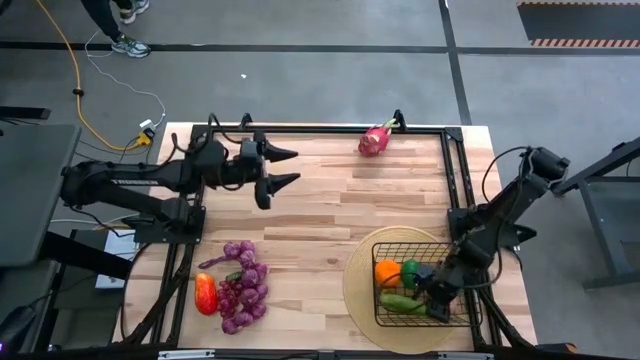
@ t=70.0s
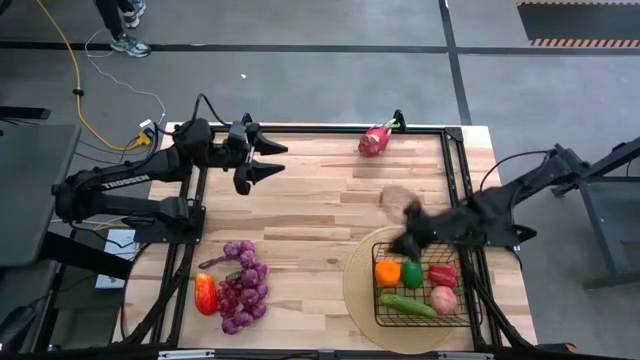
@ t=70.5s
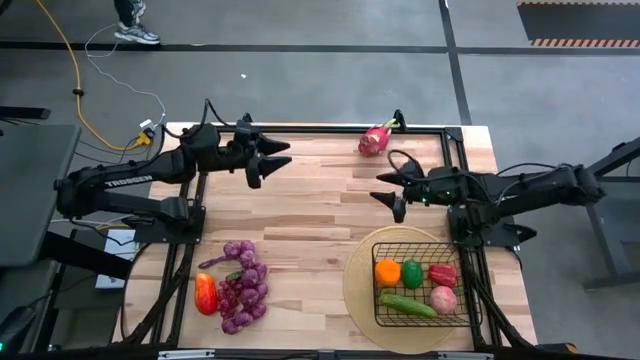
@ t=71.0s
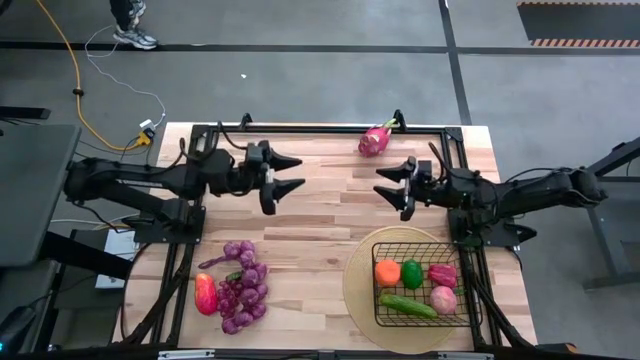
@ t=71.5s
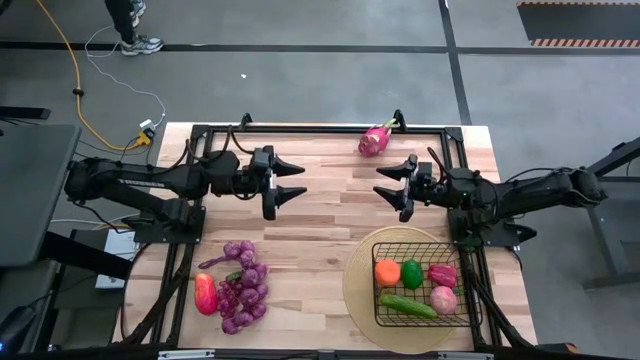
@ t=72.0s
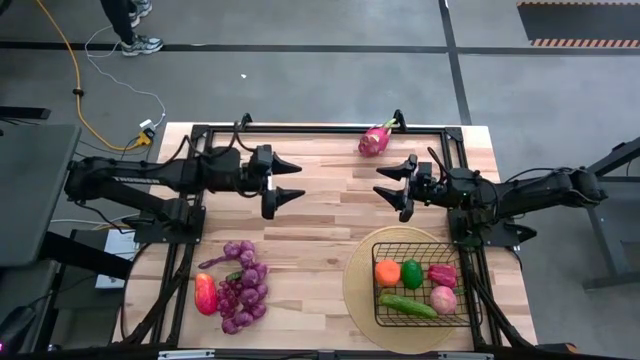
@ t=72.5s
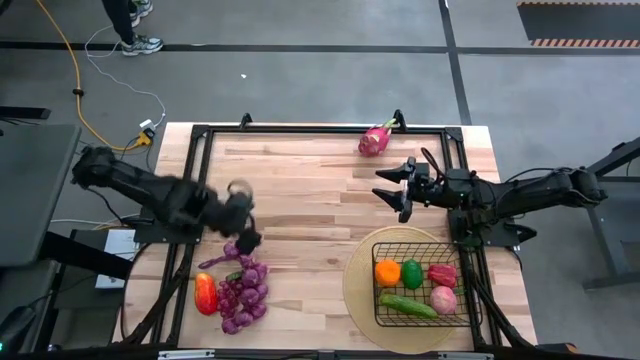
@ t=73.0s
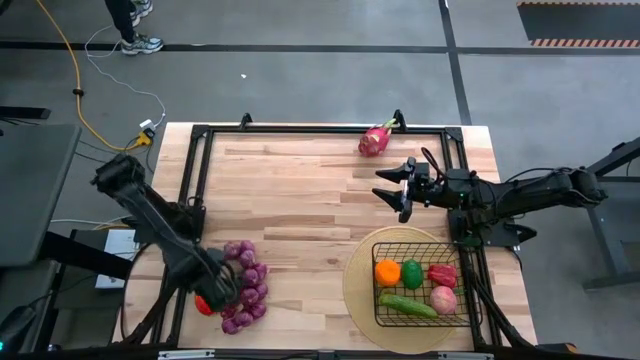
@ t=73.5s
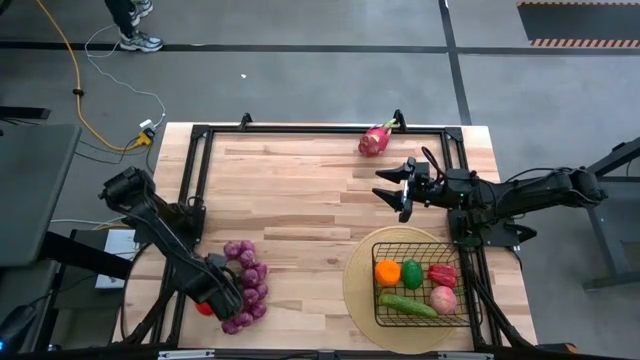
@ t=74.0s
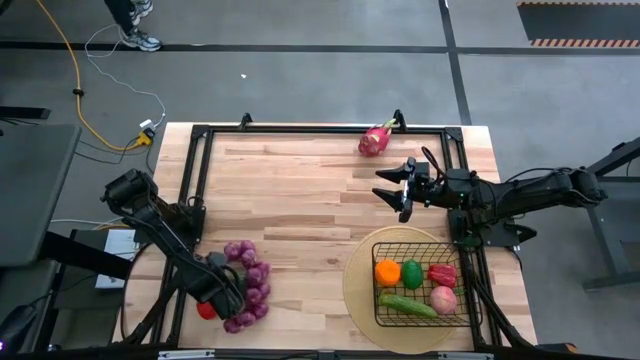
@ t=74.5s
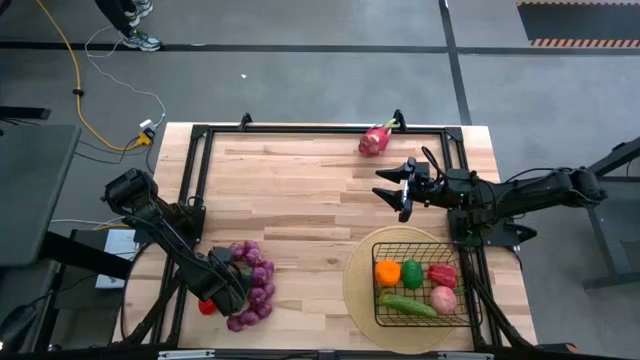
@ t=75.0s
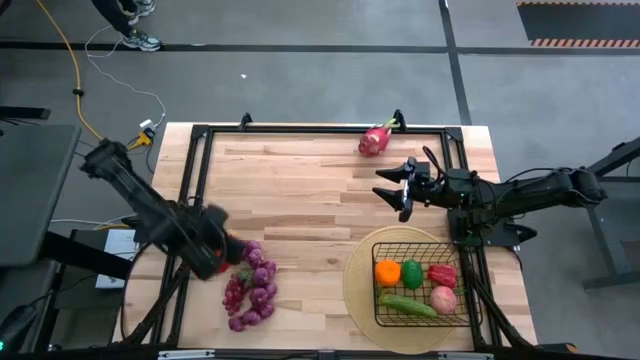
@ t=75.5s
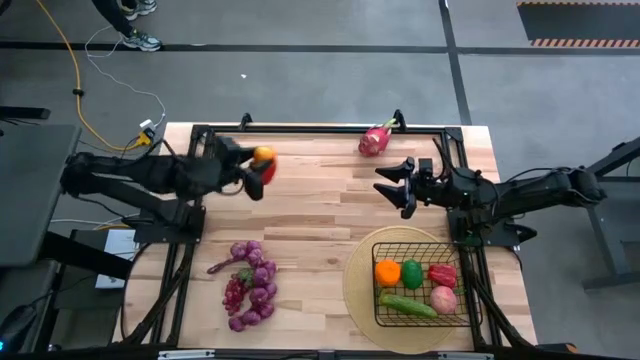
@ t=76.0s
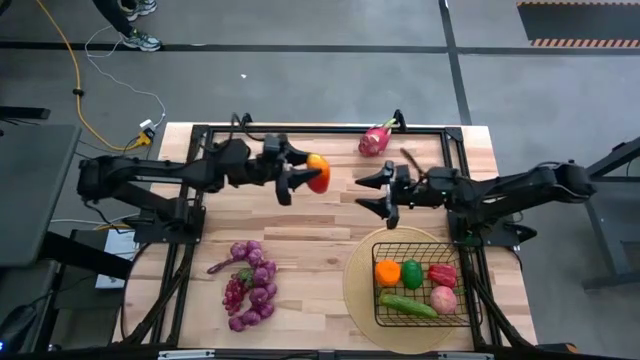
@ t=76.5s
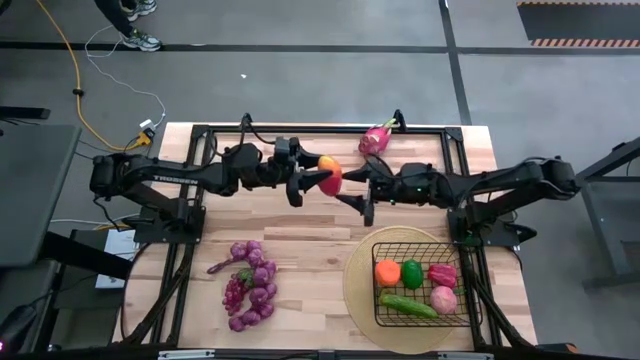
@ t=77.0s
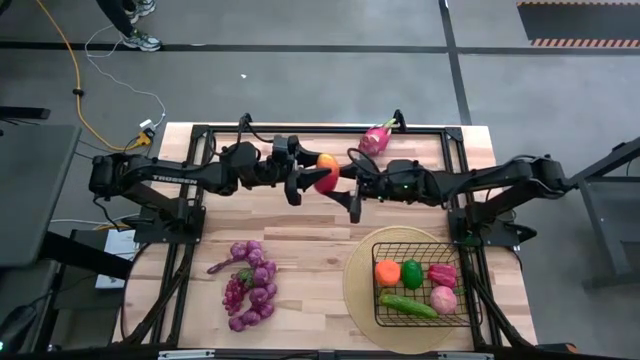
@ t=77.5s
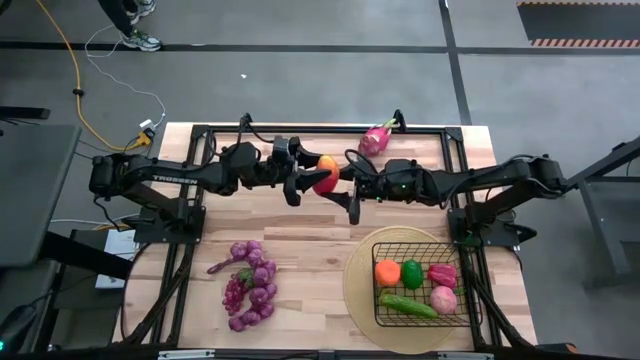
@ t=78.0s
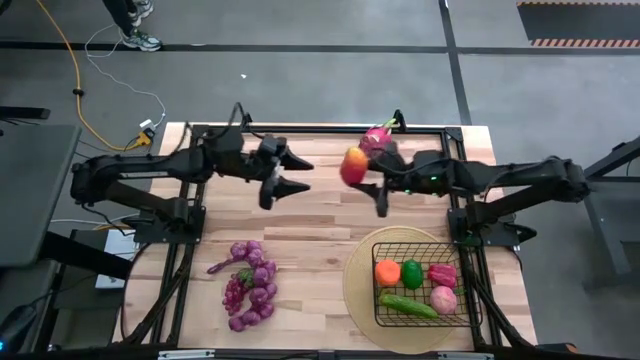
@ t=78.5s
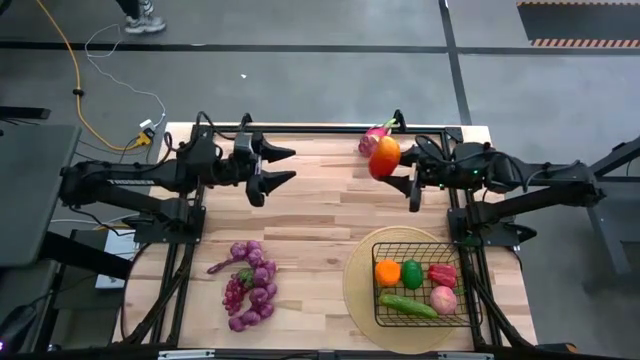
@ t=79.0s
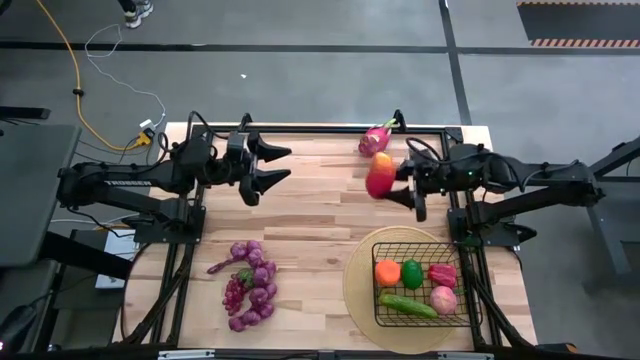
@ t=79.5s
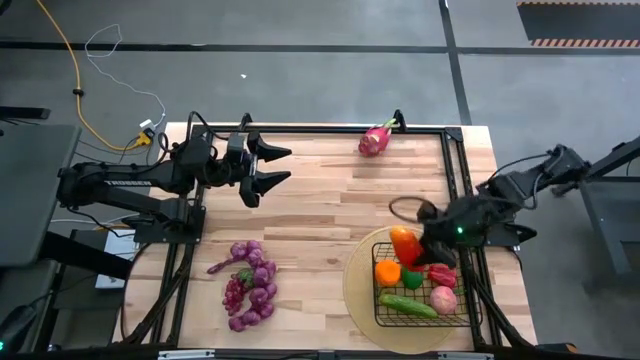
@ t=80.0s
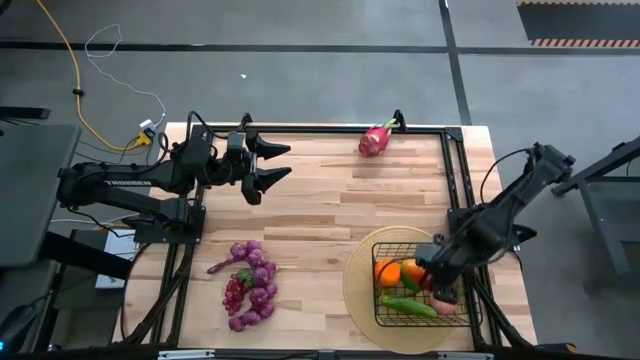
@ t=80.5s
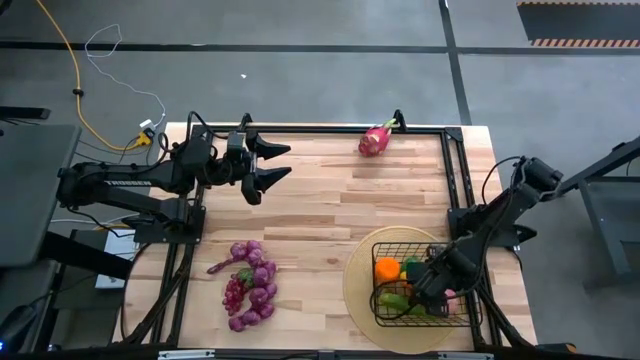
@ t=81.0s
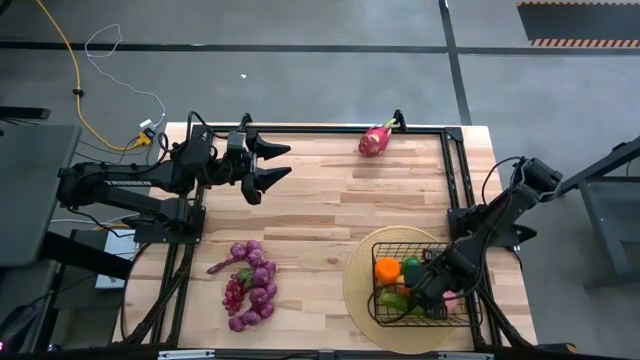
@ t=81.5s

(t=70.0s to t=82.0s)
Task: Build produce basket
Put the mango into the wire basket

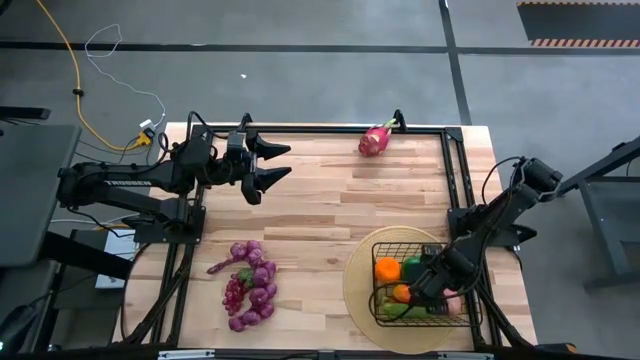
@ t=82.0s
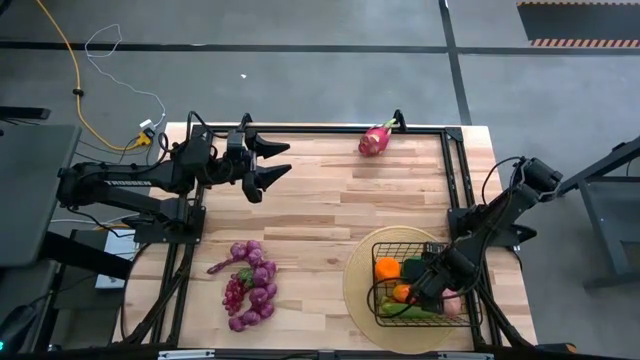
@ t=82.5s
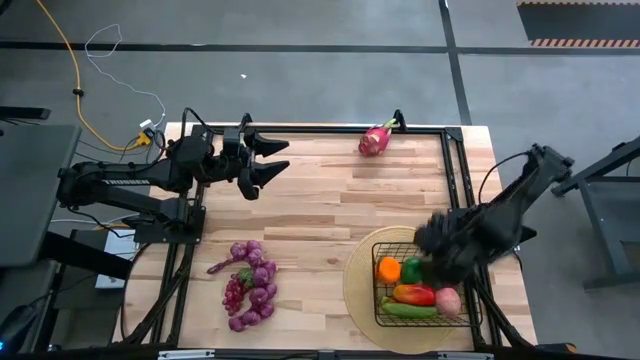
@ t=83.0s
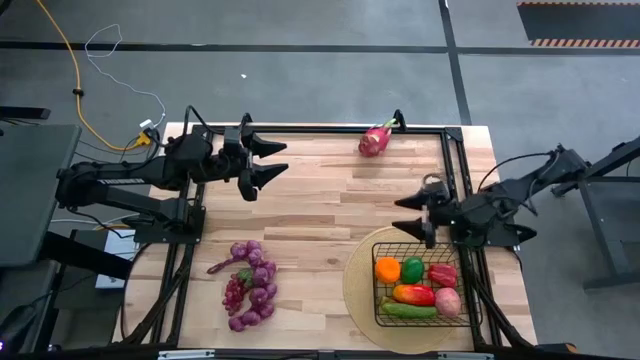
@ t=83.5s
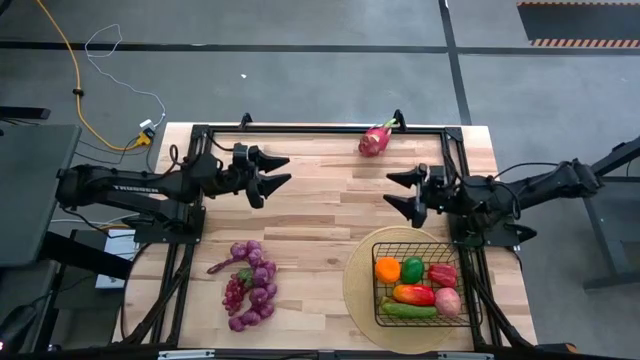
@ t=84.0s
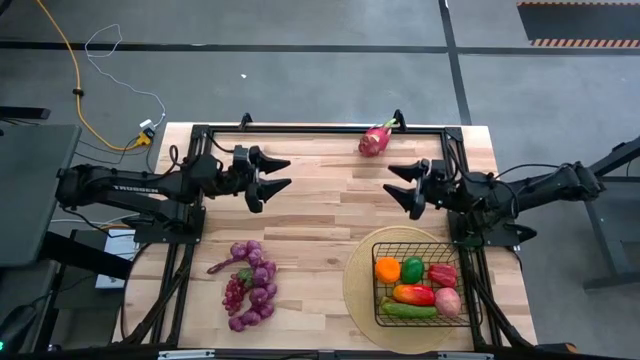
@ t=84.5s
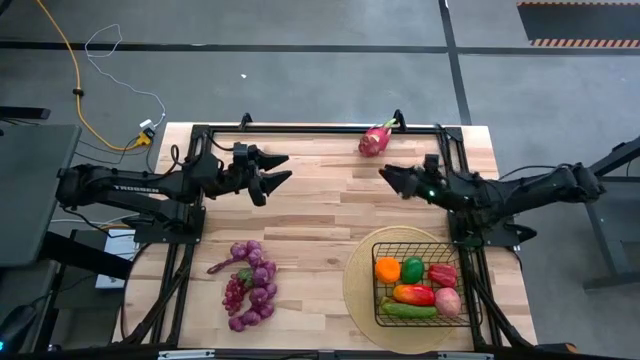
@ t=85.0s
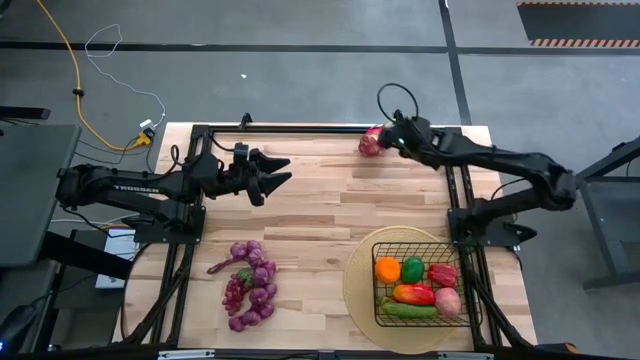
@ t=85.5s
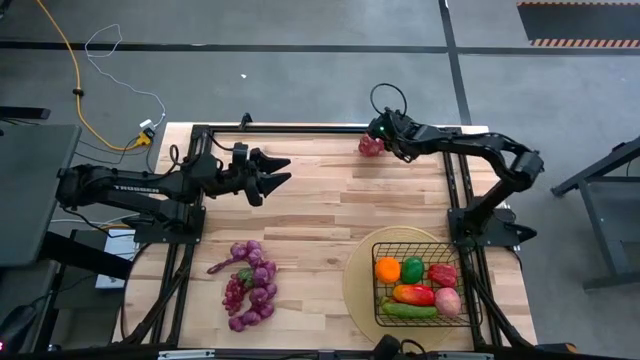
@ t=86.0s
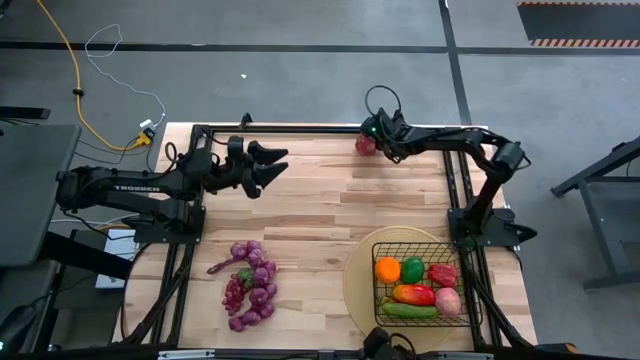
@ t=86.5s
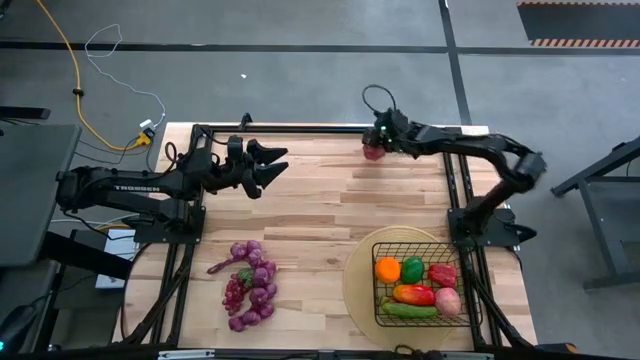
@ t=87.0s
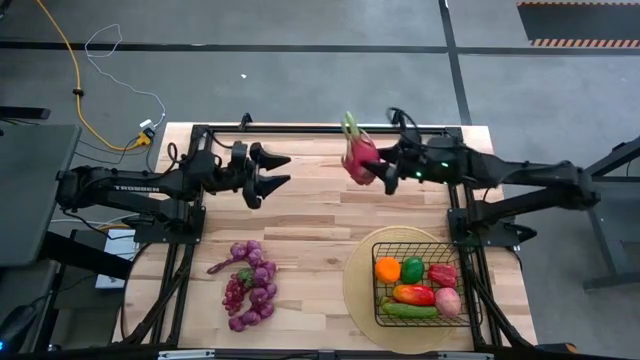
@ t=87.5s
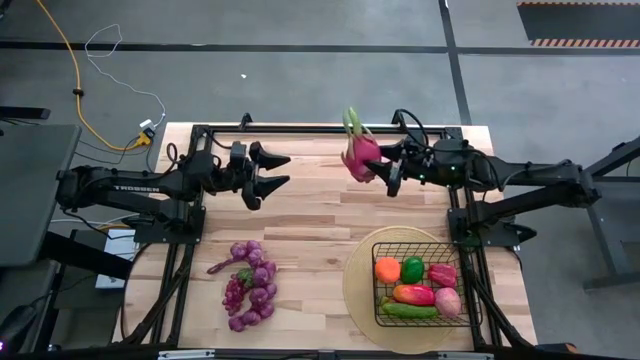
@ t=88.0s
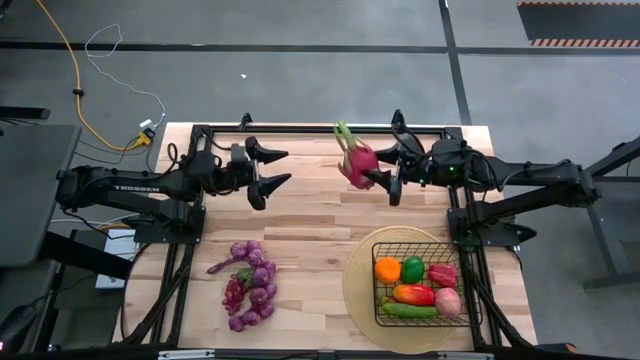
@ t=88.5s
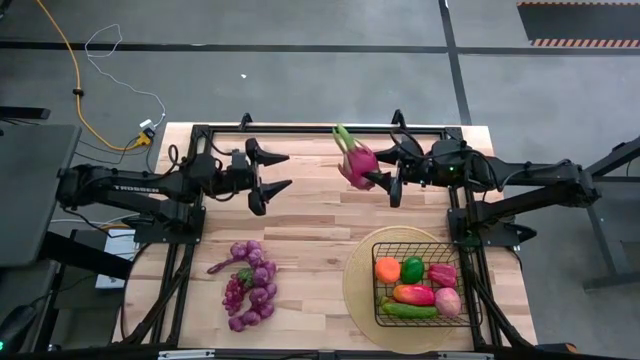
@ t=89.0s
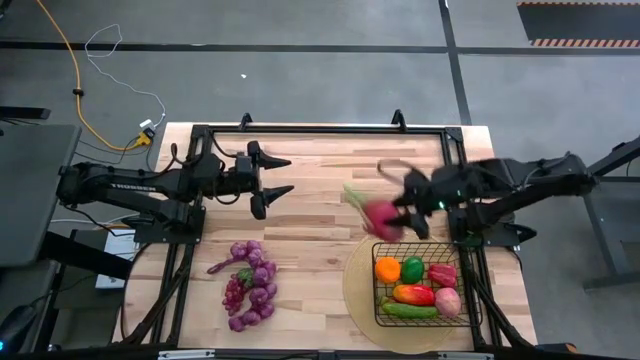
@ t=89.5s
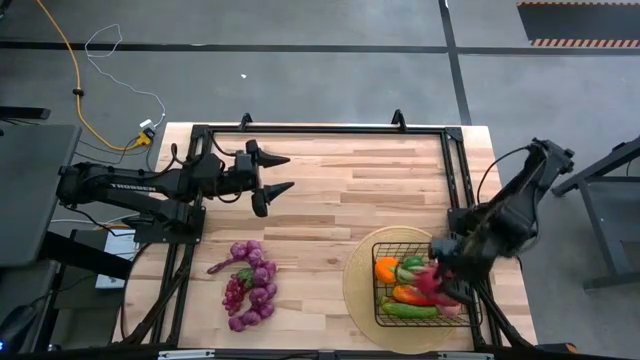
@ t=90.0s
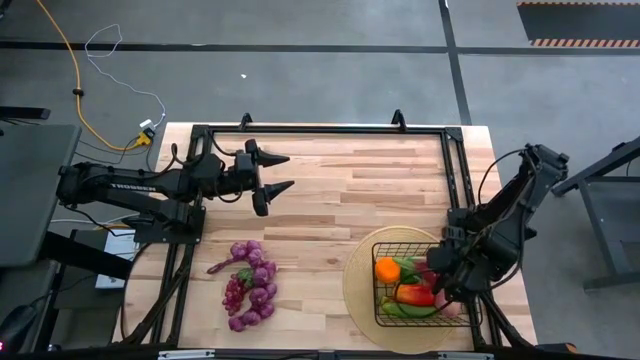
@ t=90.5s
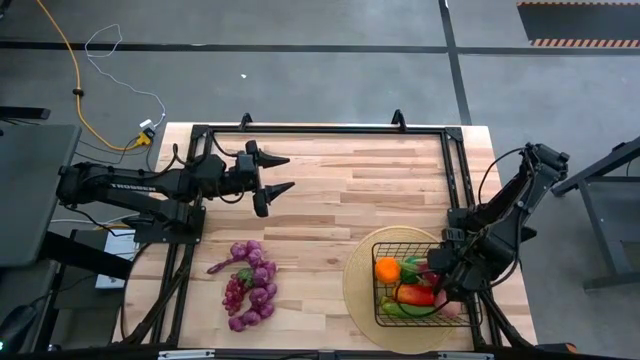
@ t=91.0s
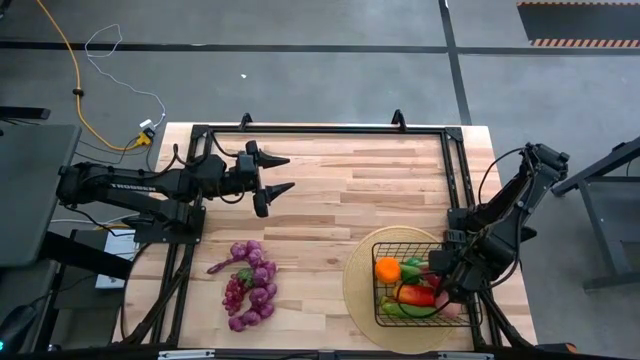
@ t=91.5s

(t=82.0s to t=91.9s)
Put the dragon fruit into the wire basket
